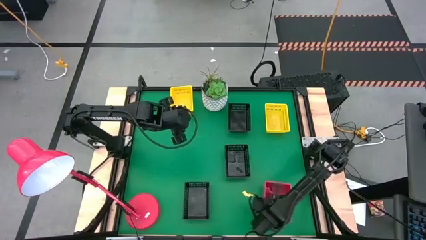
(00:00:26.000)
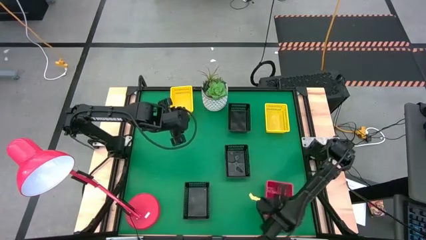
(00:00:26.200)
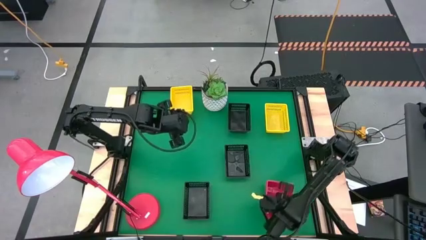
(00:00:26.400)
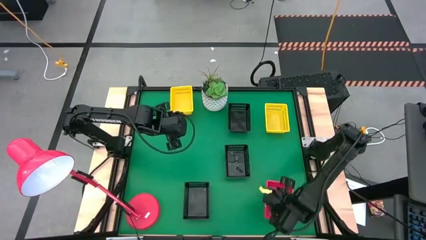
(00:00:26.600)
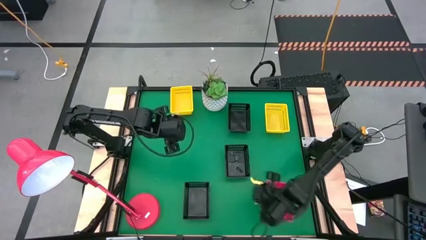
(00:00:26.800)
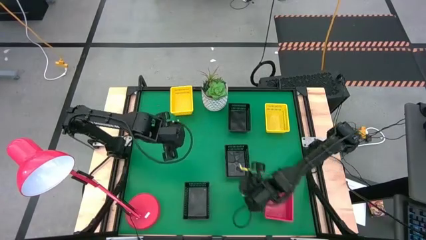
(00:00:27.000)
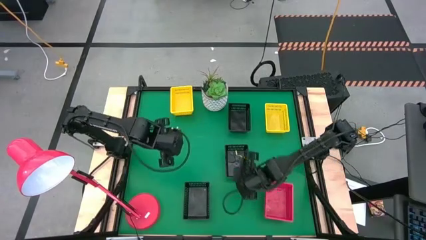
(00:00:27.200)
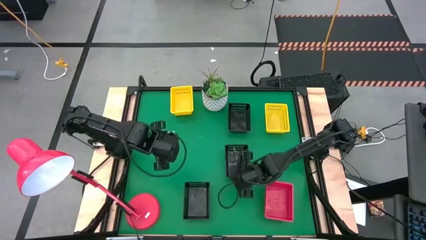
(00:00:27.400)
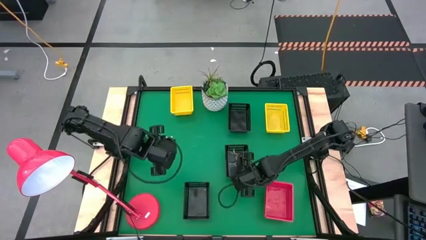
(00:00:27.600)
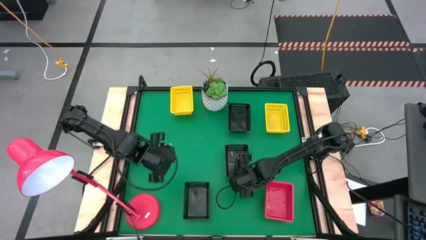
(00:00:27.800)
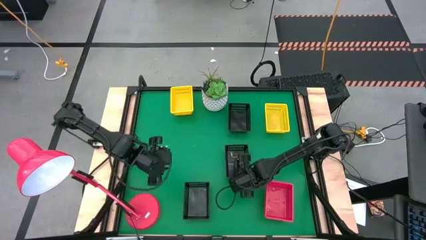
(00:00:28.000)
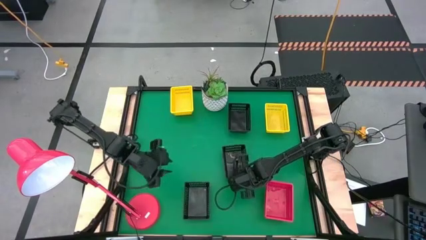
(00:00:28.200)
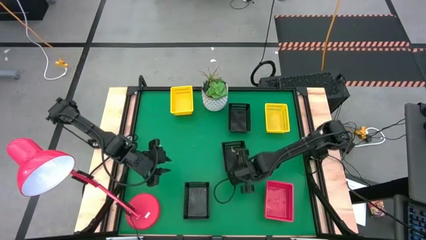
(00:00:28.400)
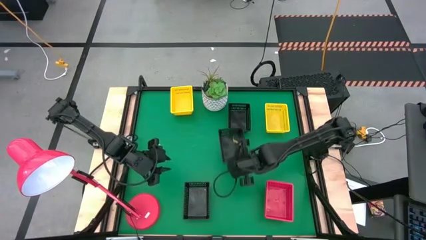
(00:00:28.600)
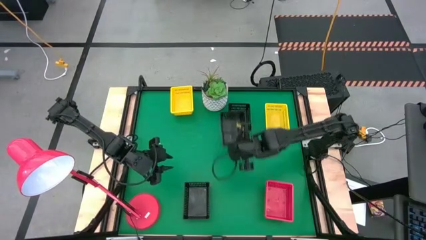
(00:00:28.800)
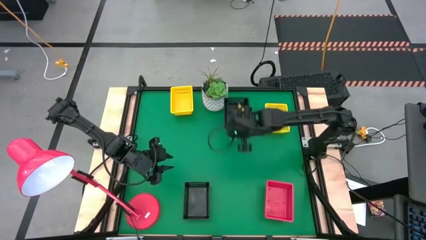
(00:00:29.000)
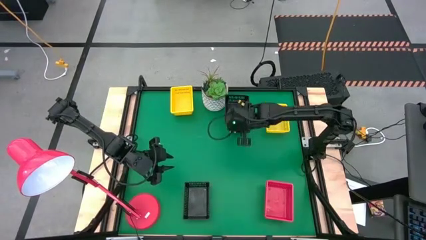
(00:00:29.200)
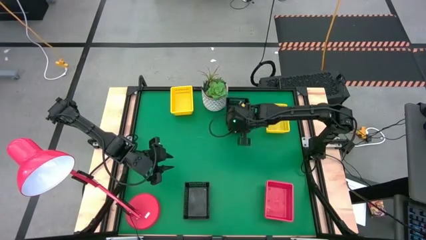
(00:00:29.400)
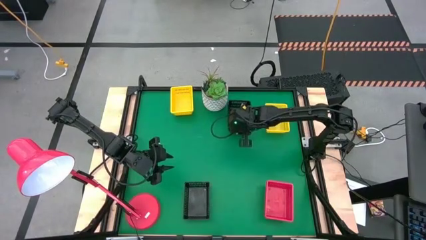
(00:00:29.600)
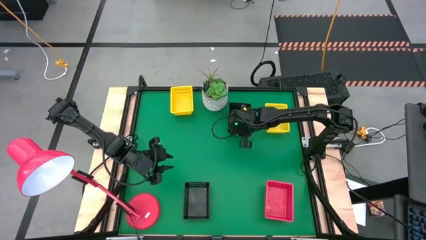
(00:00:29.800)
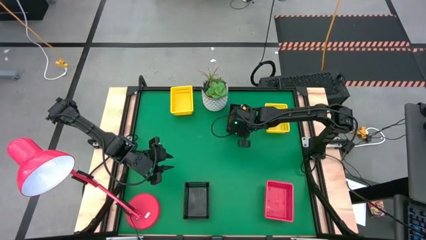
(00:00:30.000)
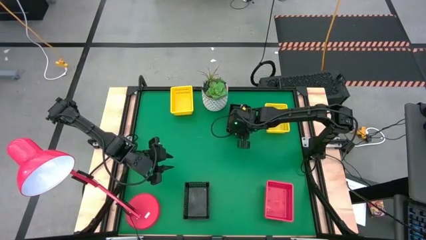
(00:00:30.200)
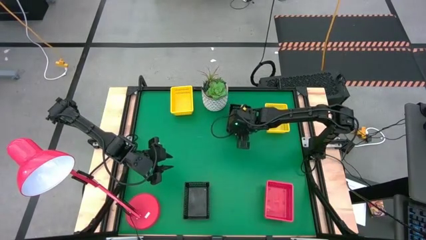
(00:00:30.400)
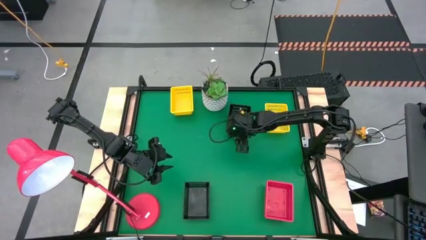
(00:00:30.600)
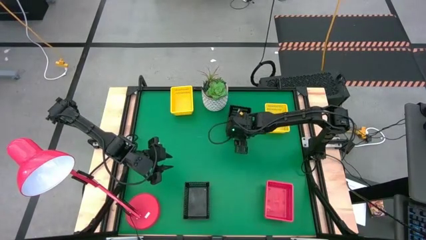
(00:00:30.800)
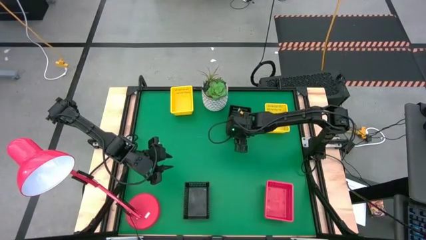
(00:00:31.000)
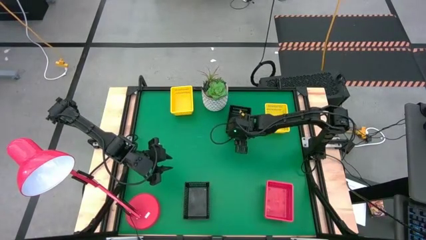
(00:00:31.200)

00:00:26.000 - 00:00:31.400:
Stack the middle black bin on the top black bin

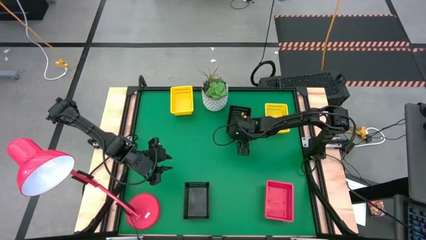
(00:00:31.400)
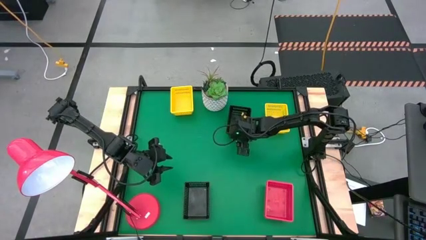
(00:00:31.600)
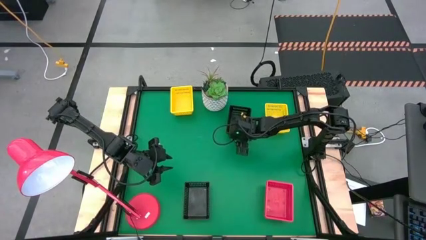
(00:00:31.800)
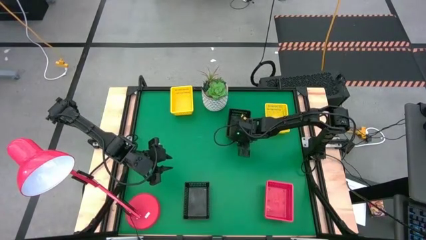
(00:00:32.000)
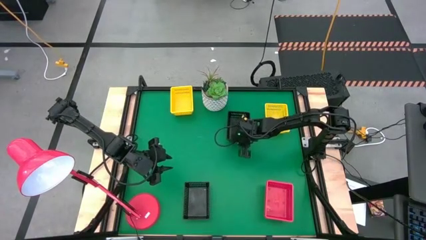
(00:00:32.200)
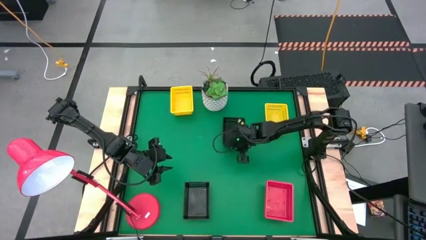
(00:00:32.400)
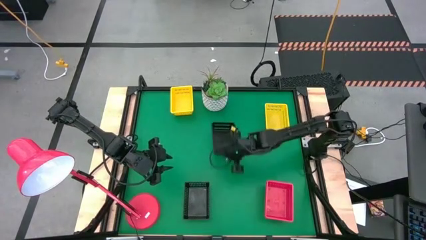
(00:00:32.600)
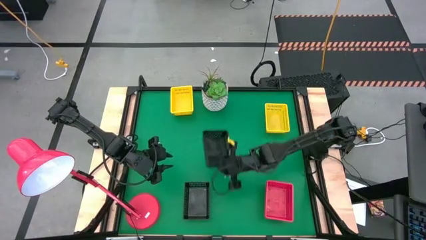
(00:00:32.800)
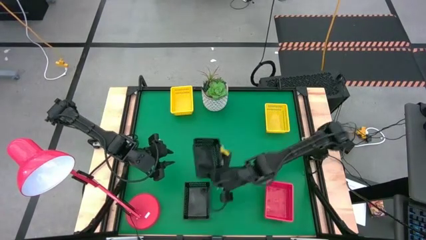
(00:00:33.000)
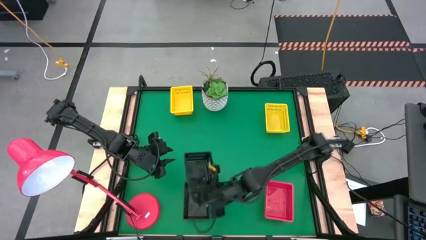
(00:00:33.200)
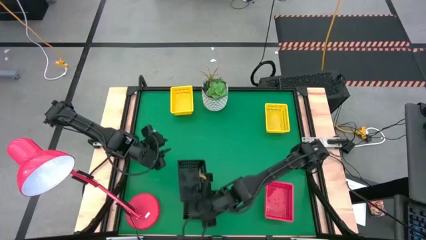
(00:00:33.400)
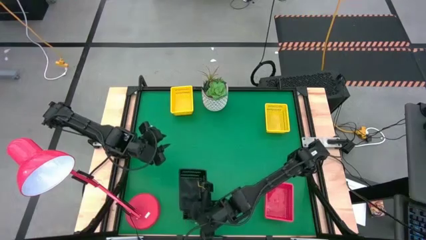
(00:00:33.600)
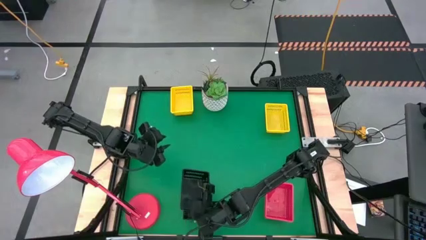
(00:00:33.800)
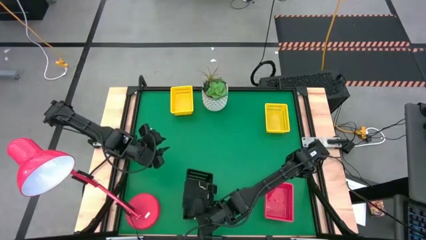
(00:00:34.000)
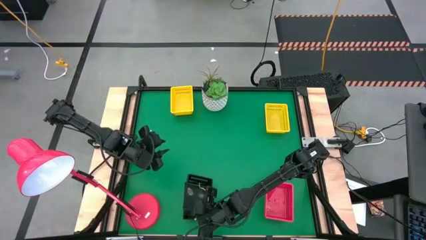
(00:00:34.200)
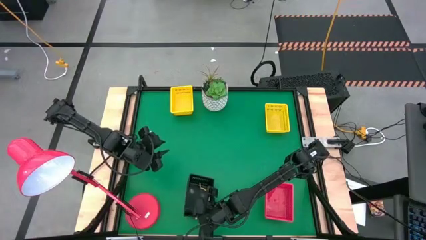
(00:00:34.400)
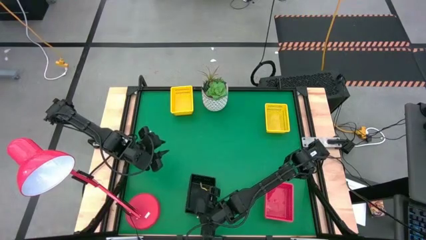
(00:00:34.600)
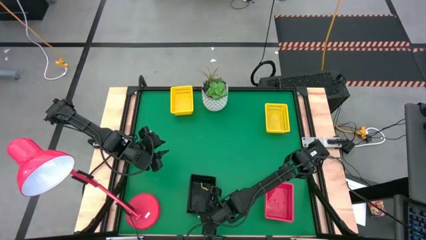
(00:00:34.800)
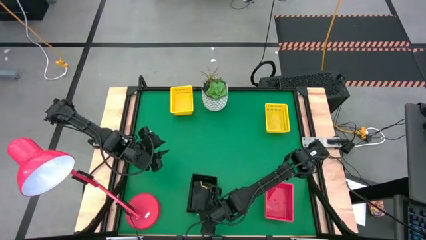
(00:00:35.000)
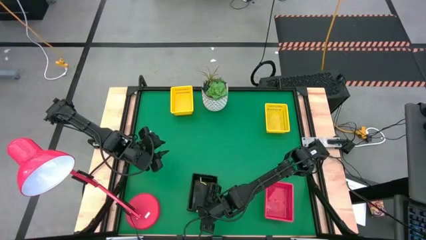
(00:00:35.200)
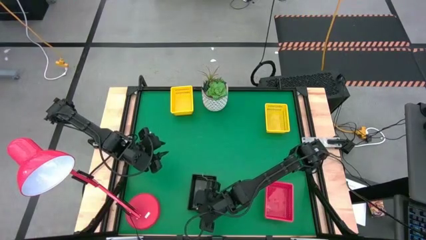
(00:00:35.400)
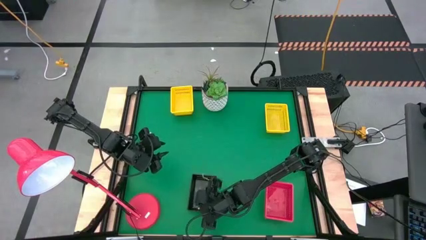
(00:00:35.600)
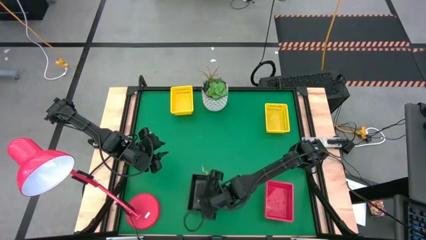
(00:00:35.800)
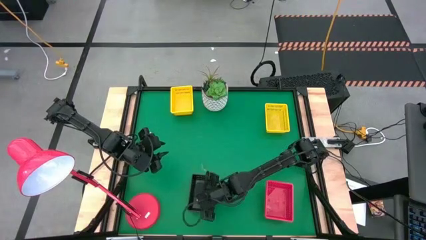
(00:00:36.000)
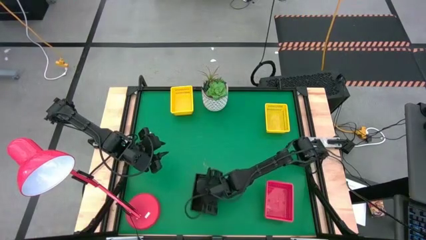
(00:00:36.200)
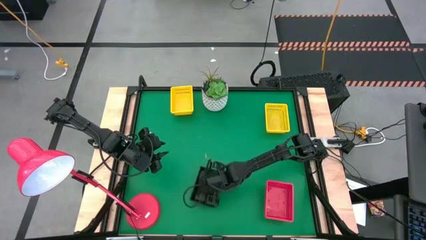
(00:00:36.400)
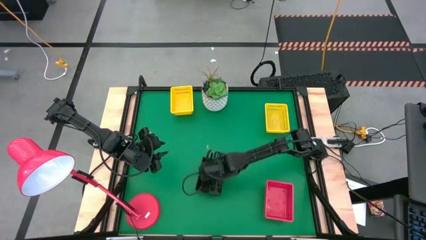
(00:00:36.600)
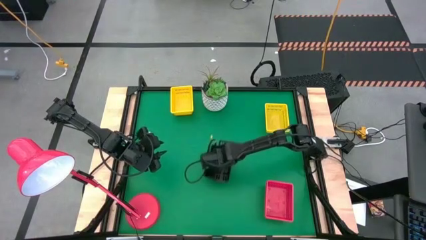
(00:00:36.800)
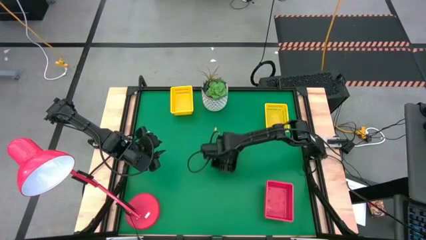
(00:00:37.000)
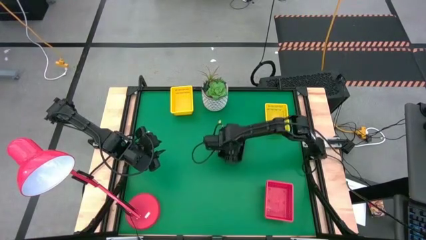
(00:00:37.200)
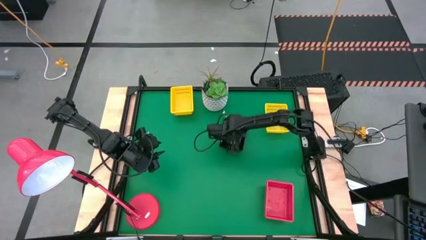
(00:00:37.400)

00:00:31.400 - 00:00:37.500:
Stack the stacked top black bins on the bottom black bin
